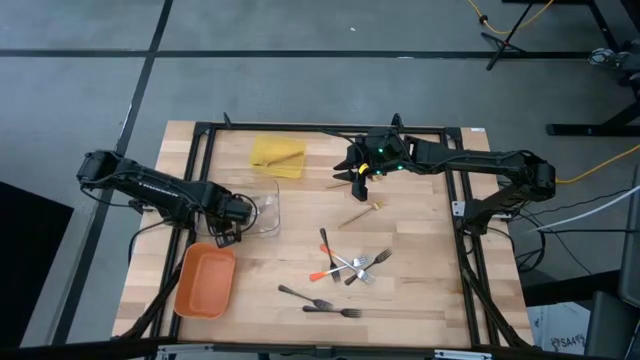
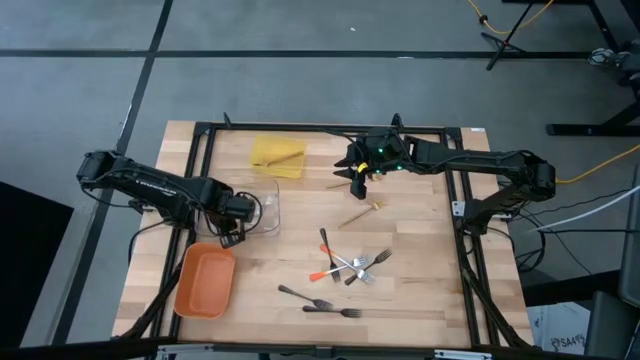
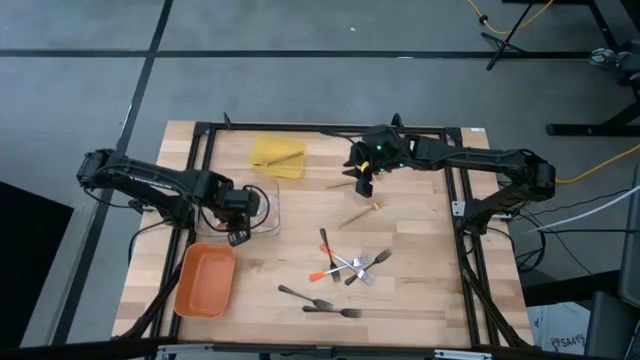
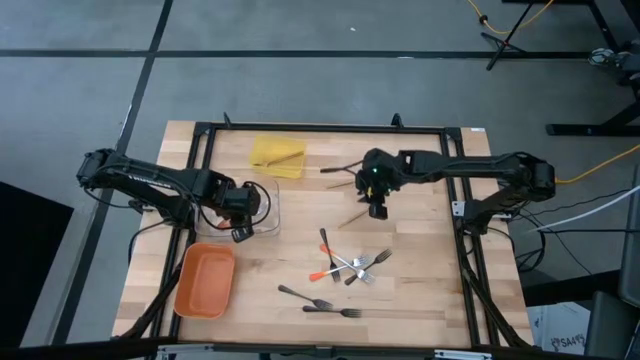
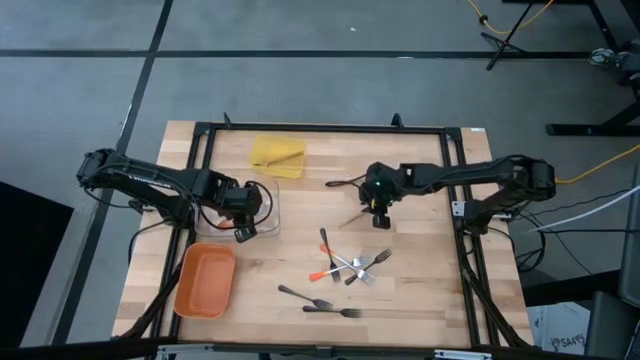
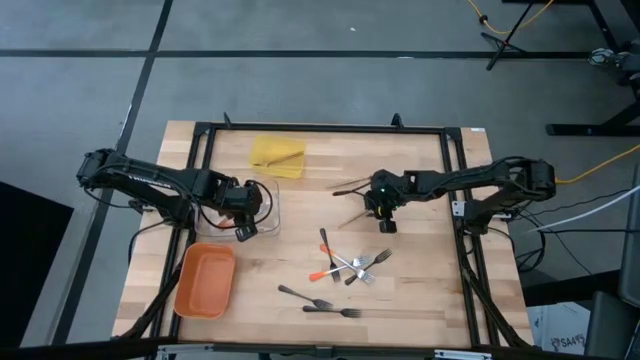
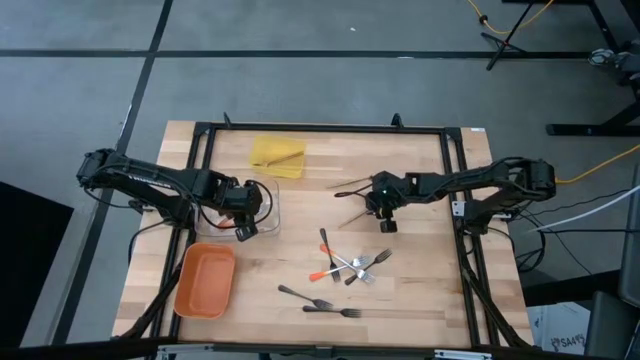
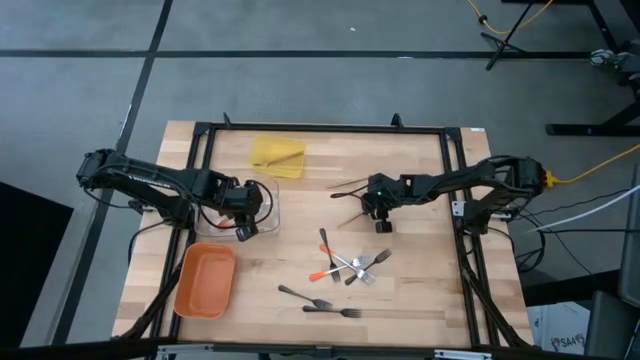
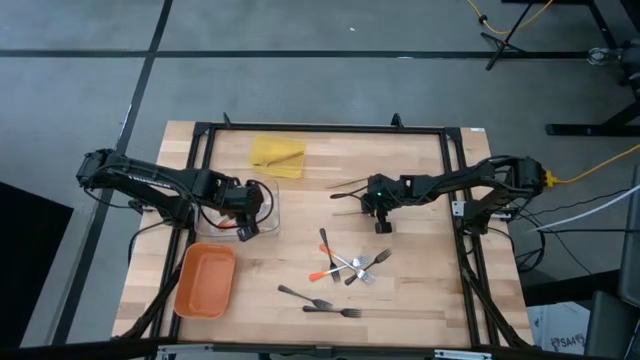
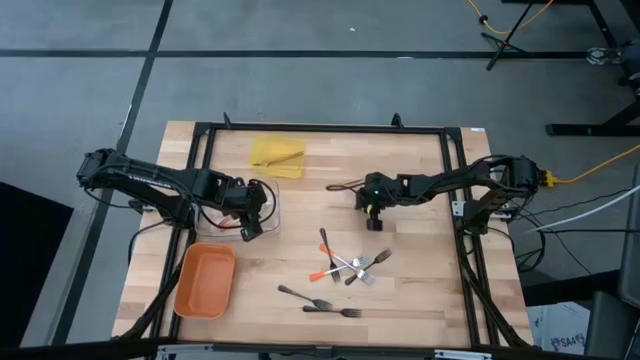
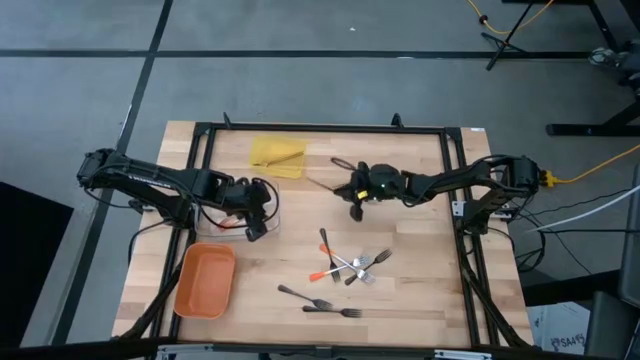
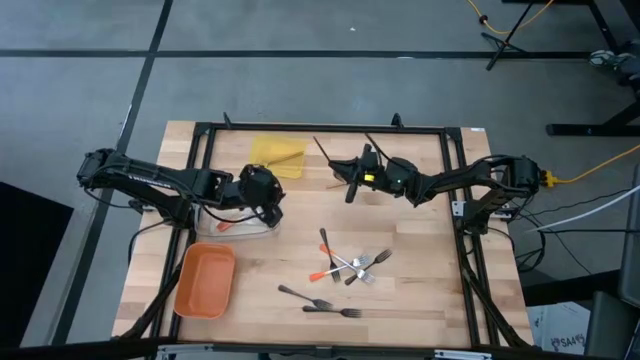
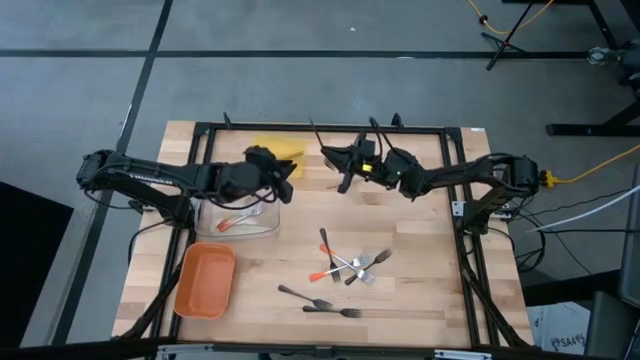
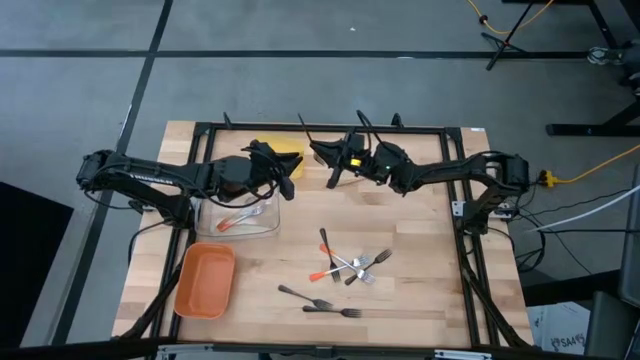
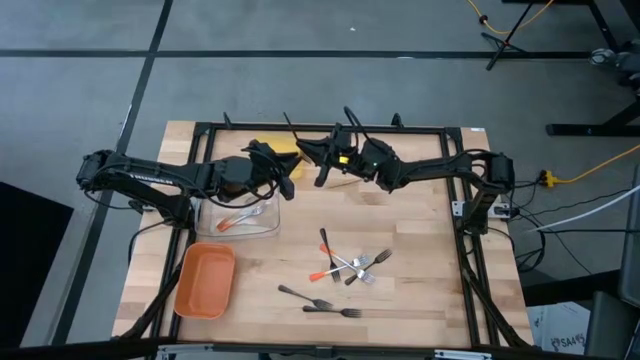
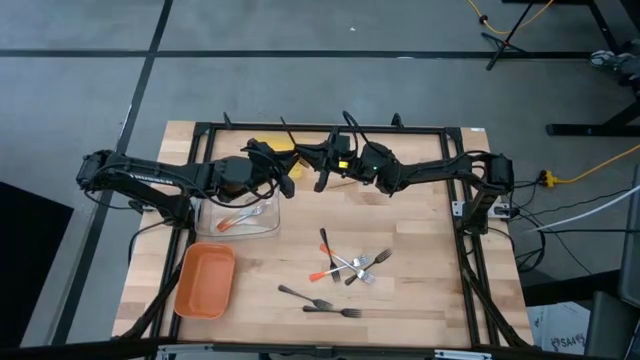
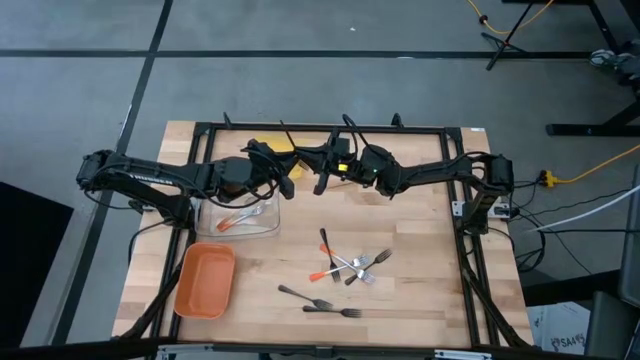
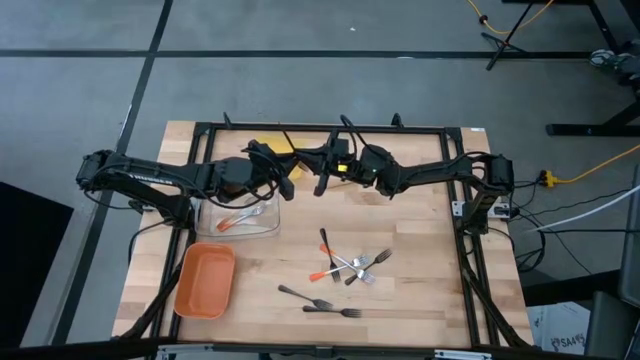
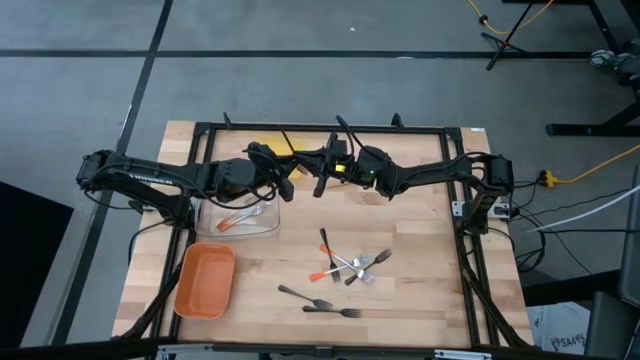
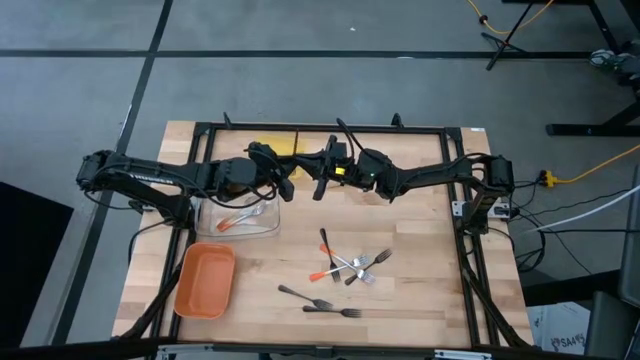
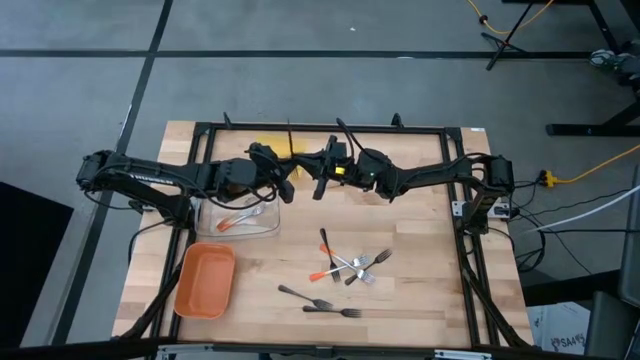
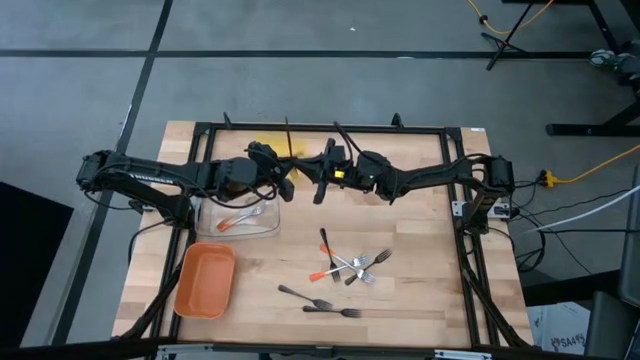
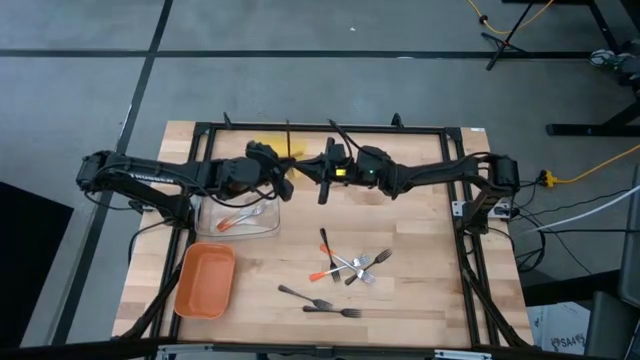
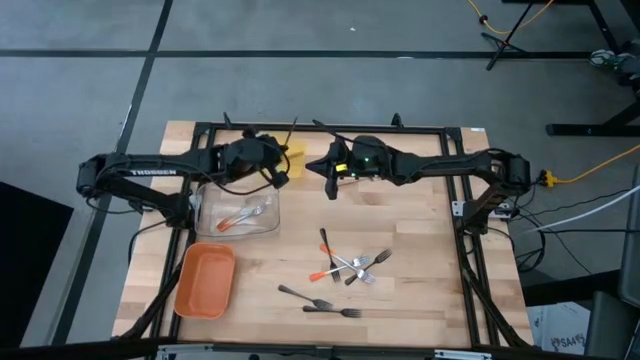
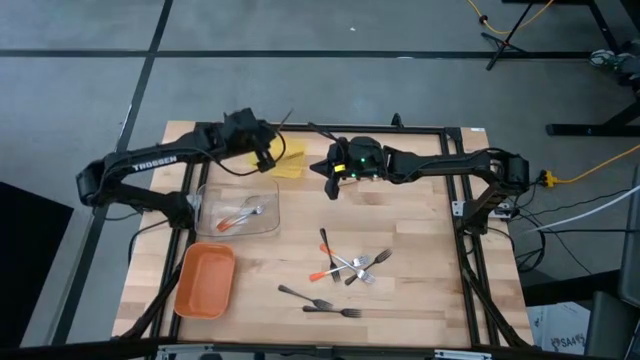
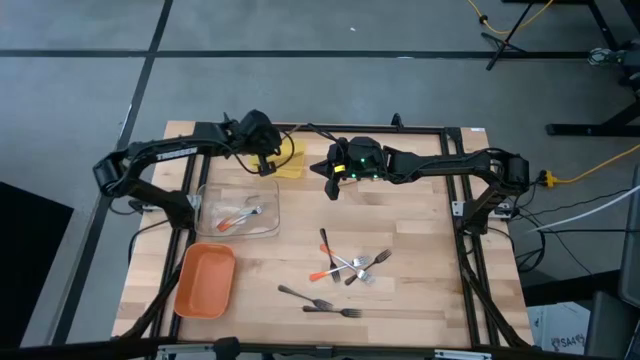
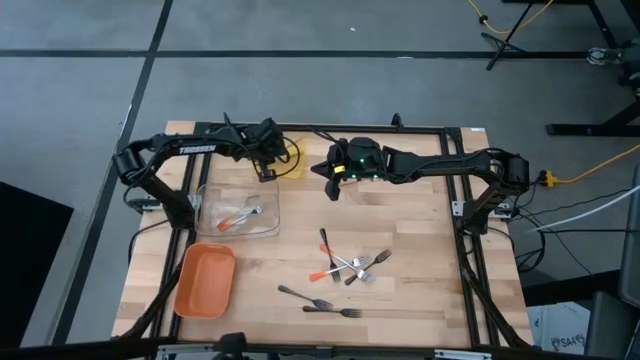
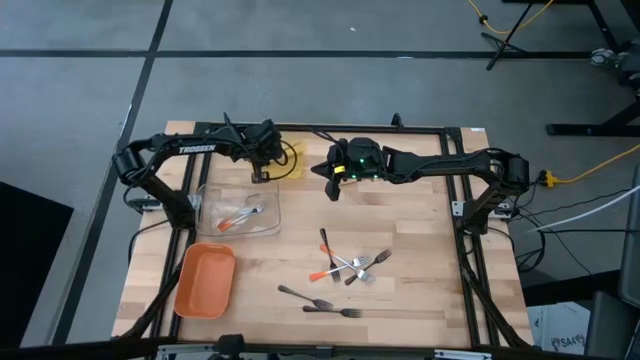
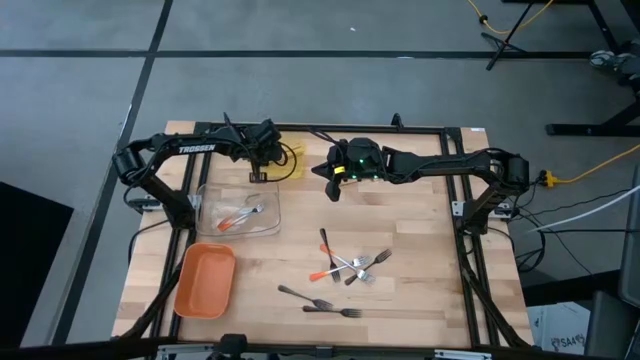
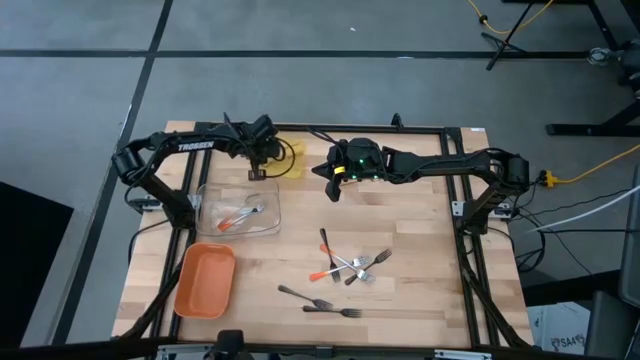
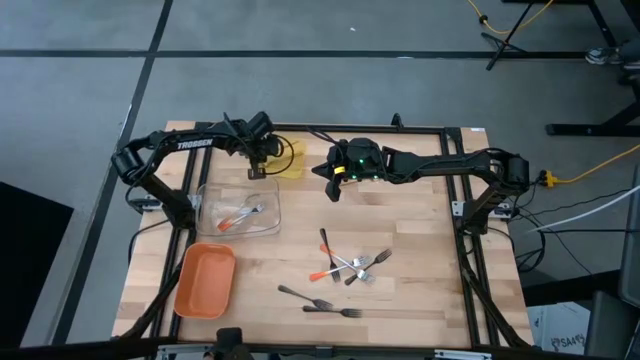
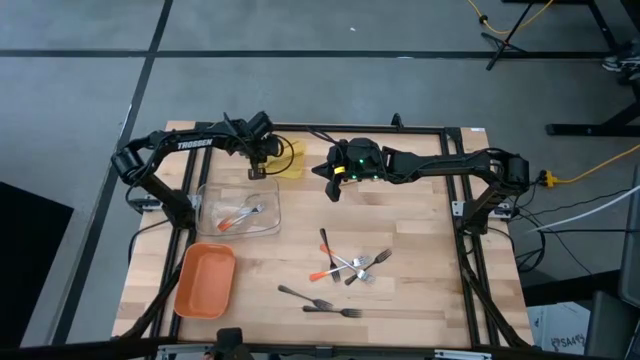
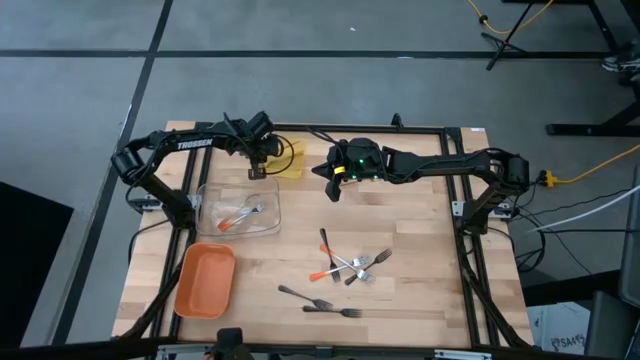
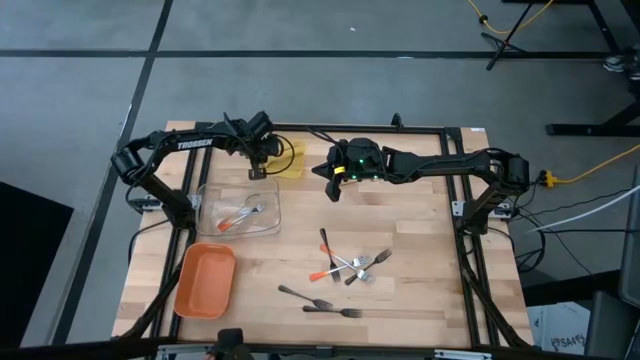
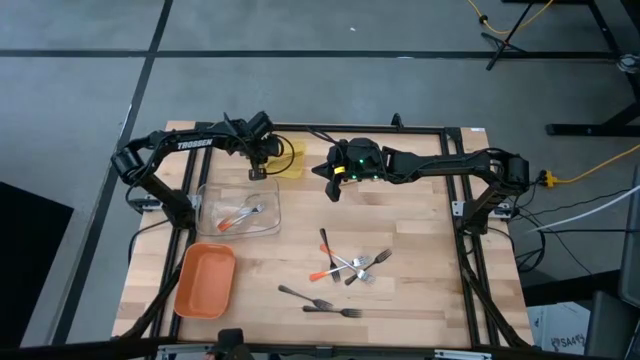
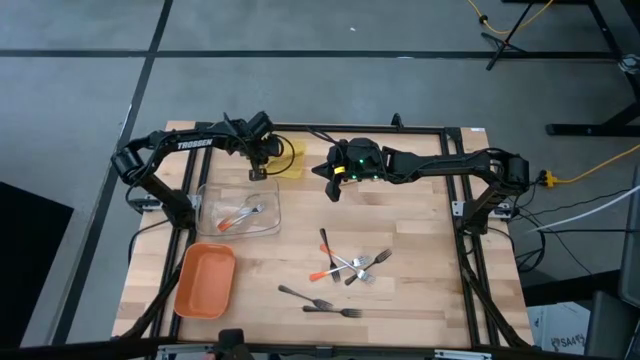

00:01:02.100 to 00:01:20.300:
Task: Sort silverware by color (type)
Put the gold fork into the yellow bin

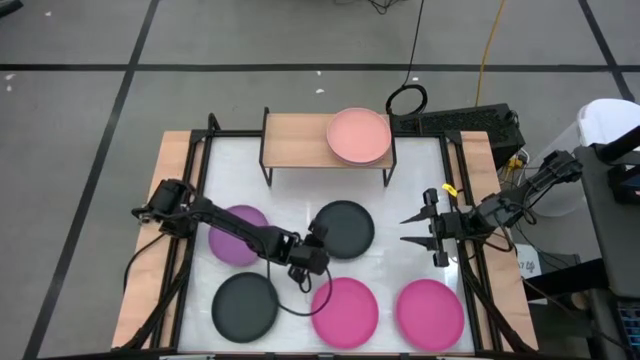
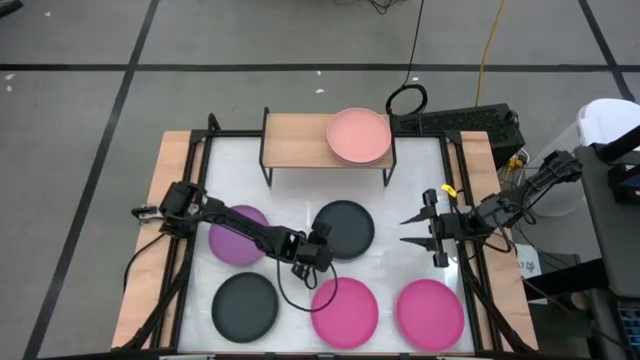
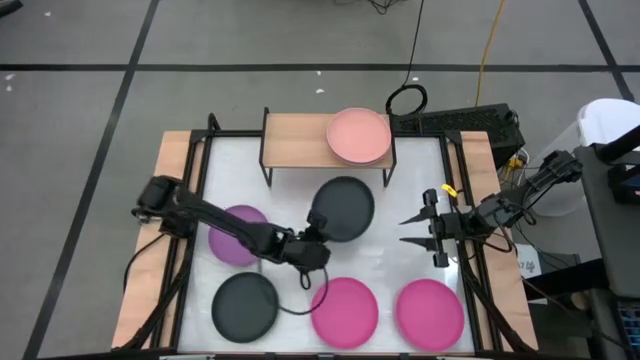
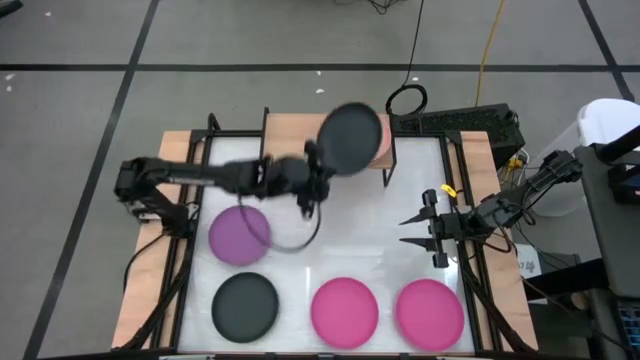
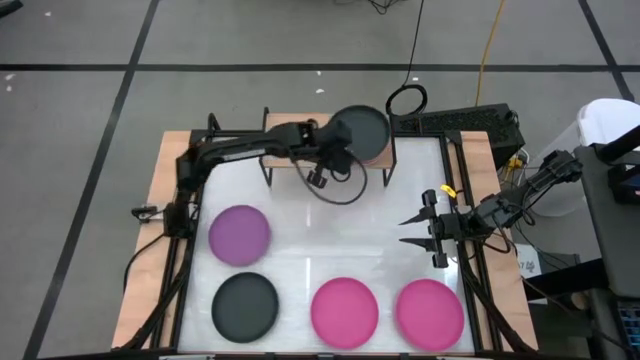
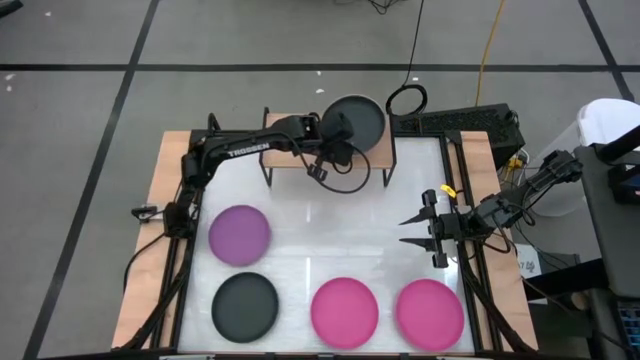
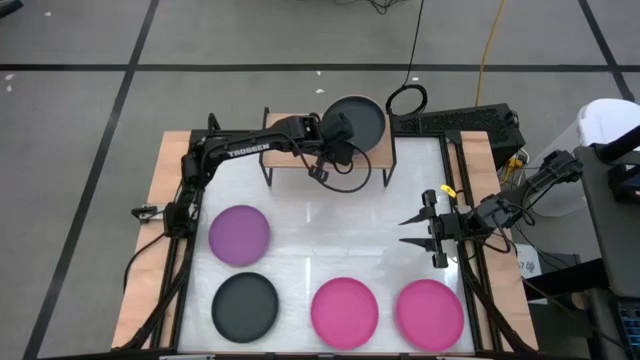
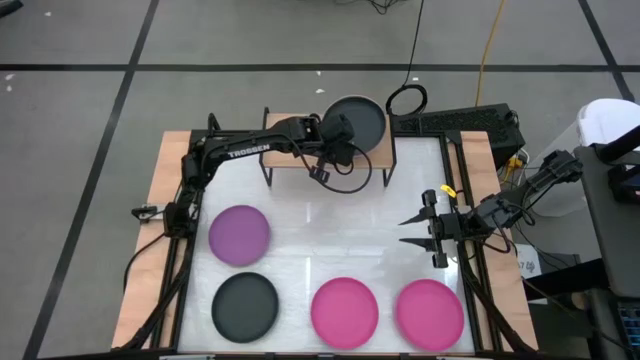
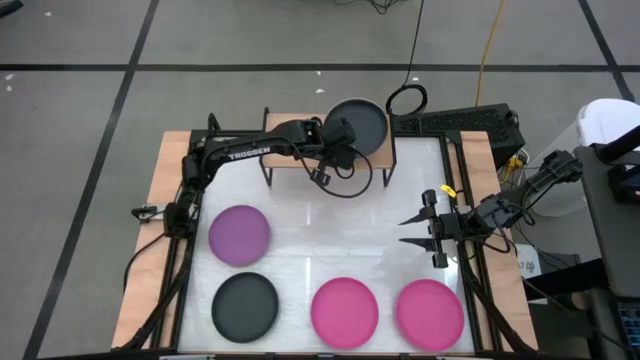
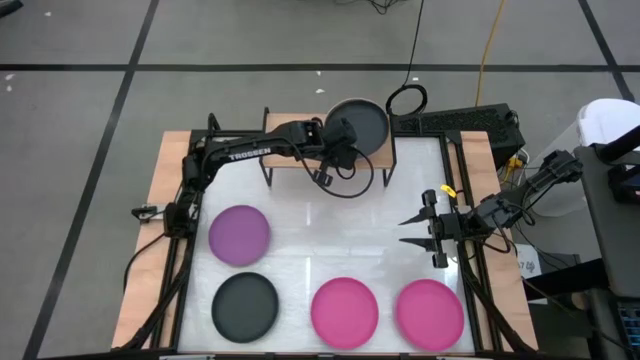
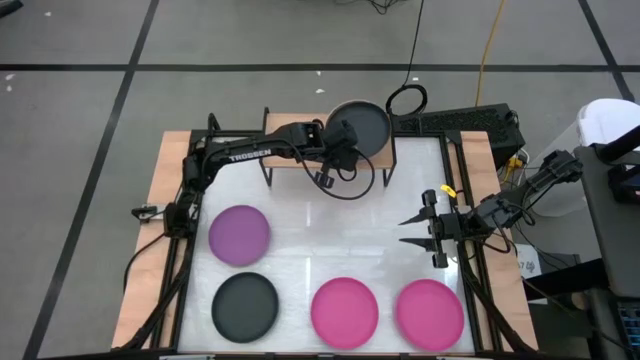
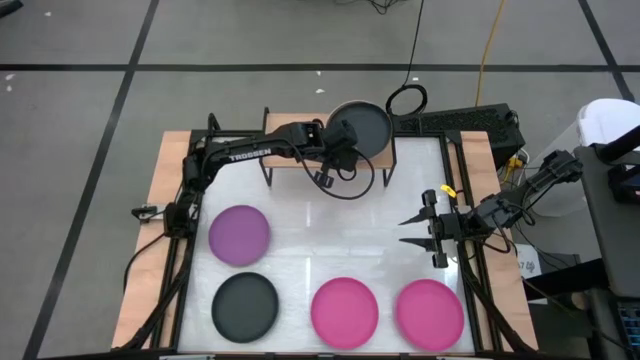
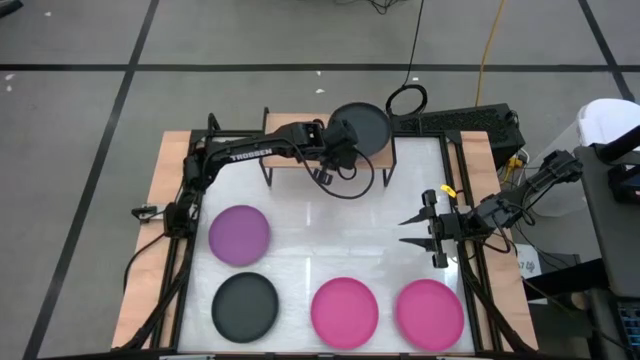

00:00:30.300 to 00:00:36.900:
Task: Place and stack plates onto a shelf
Stack the top black plate on top of the orange plate on the shelf
